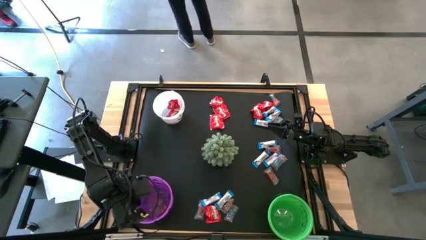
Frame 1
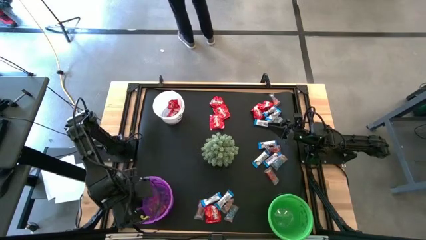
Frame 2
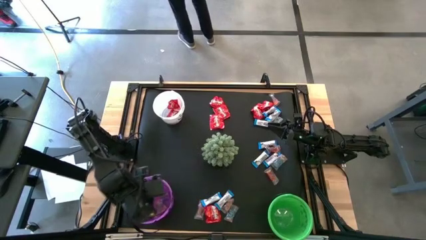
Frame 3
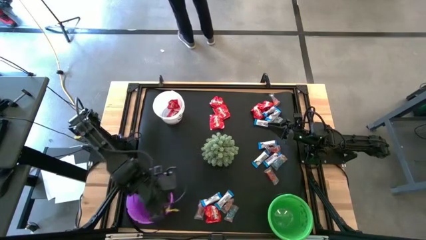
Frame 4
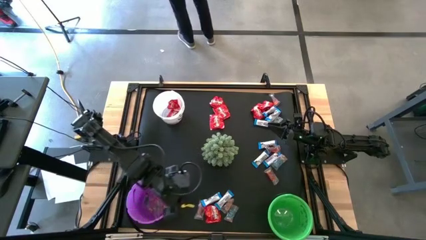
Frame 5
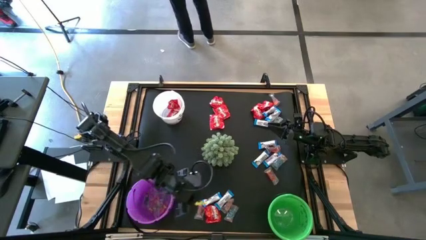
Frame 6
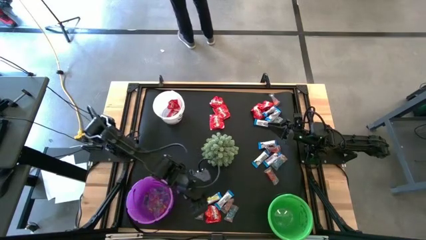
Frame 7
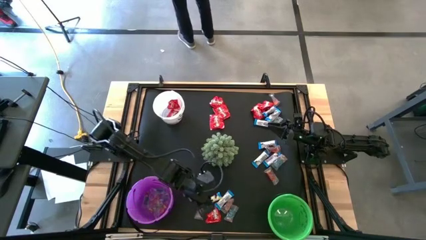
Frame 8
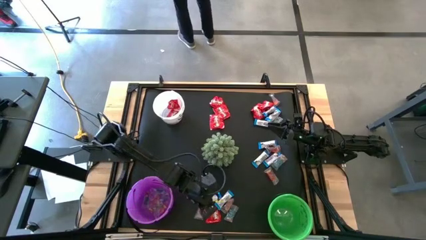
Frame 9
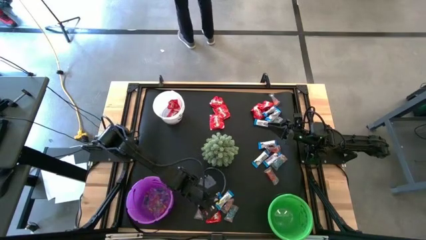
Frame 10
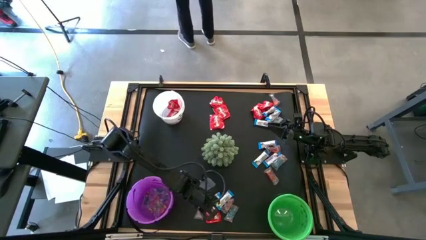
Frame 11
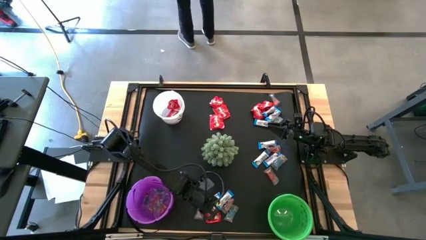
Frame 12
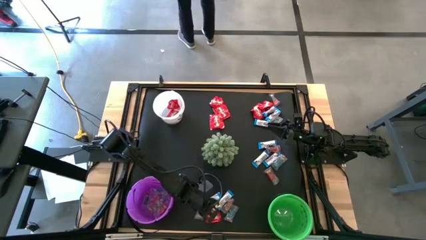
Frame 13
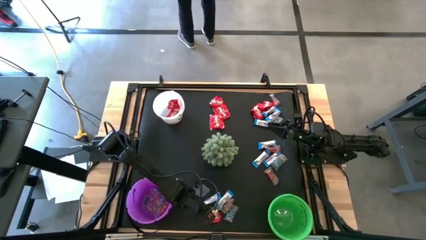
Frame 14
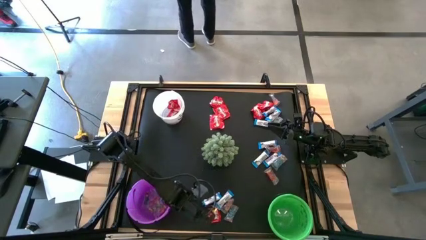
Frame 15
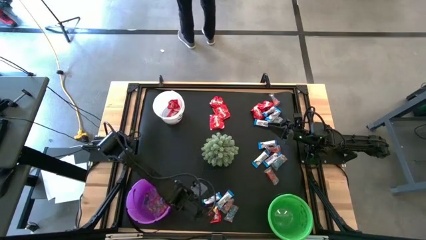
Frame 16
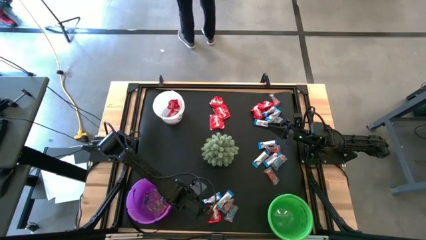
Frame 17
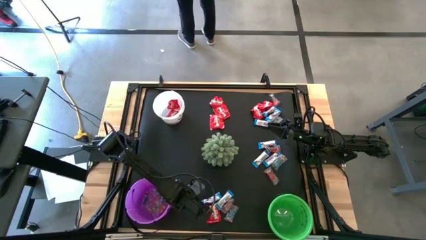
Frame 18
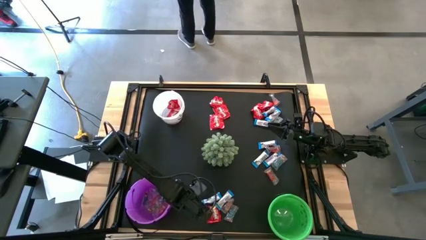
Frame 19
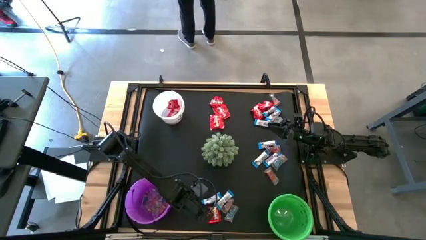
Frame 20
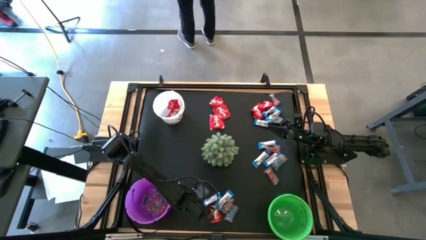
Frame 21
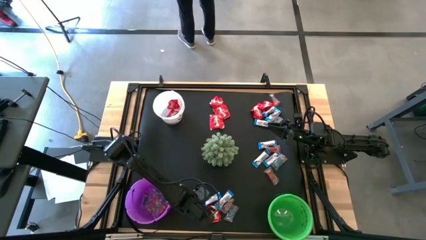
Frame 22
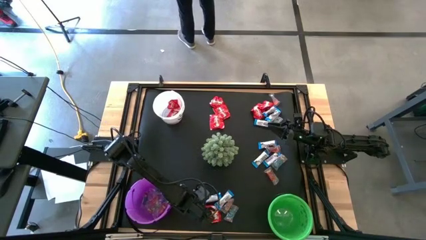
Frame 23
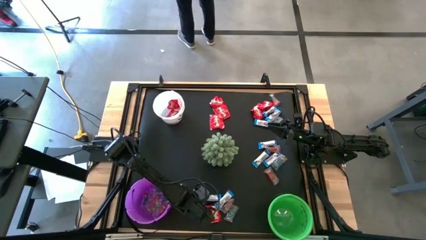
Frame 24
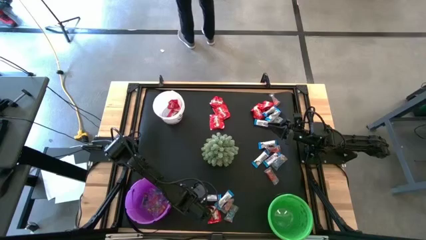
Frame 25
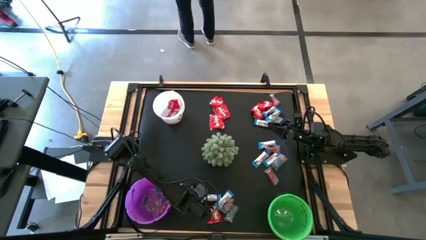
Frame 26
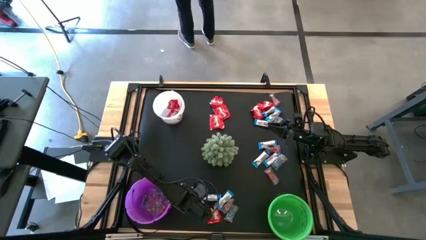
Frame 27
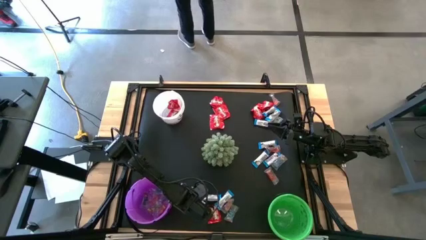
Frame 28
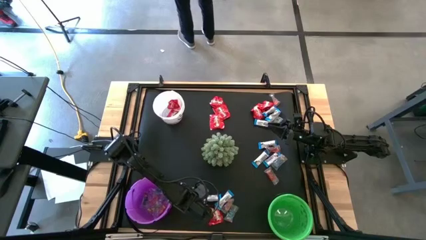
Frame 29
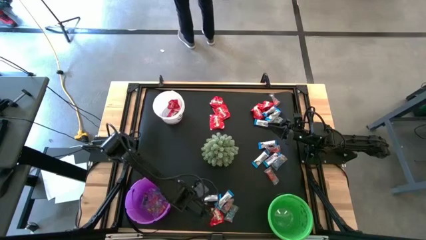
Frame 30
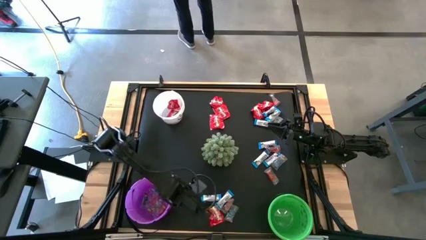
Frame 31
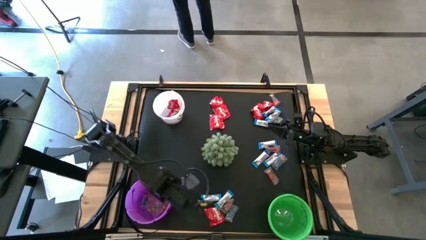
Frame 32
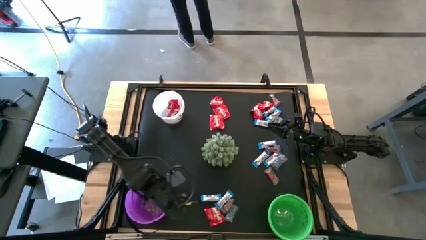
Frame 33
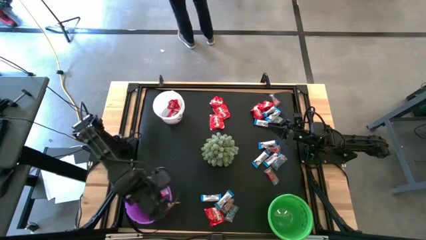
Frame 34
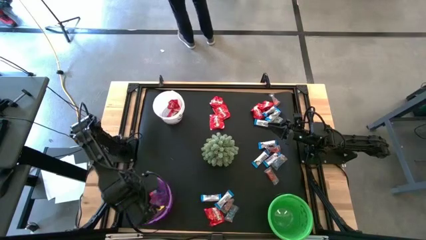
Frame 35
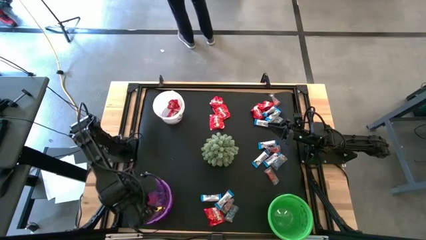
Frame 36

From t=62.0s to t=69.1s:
Task: Organize candy in baskets
Put the red gummy into the purple bucket

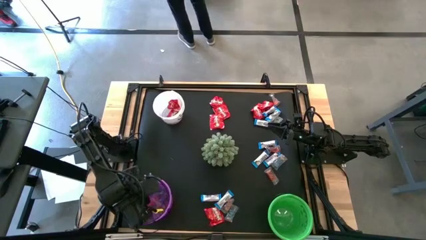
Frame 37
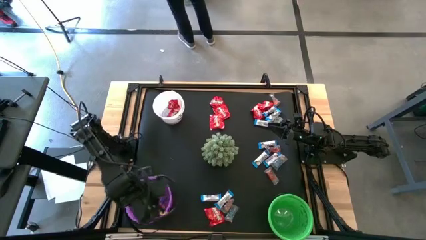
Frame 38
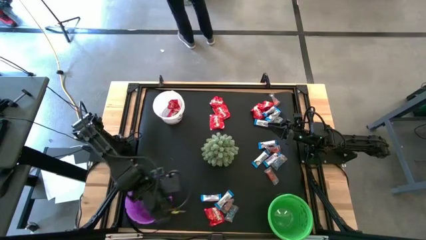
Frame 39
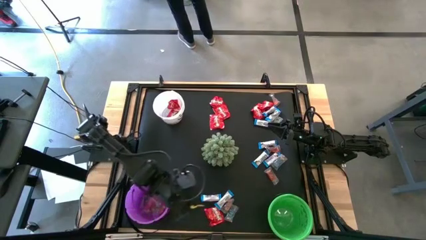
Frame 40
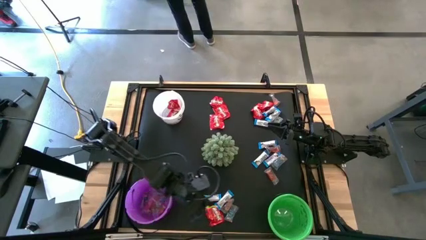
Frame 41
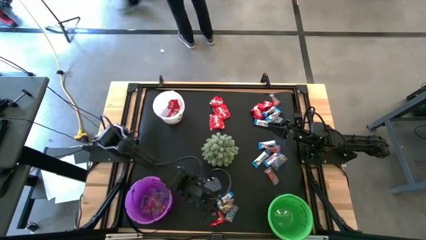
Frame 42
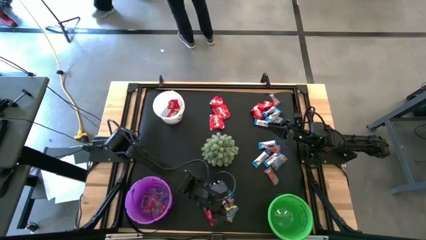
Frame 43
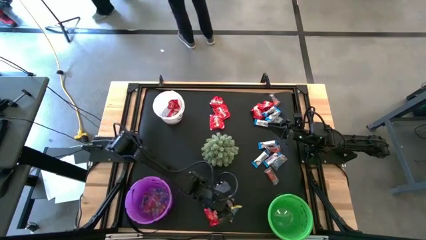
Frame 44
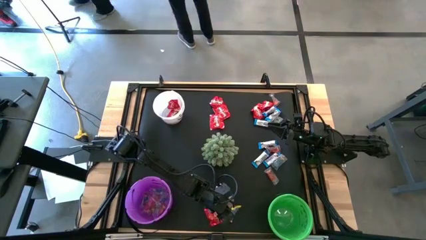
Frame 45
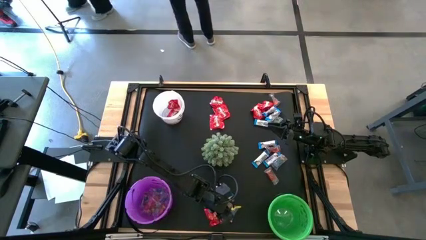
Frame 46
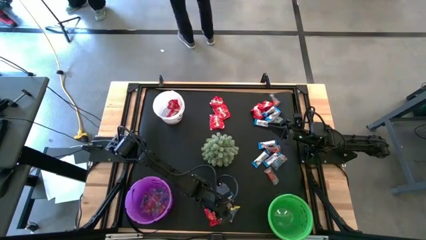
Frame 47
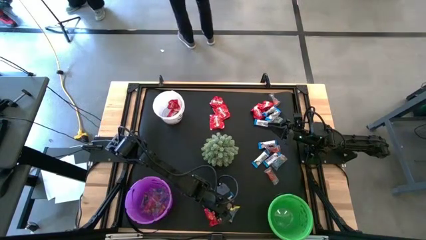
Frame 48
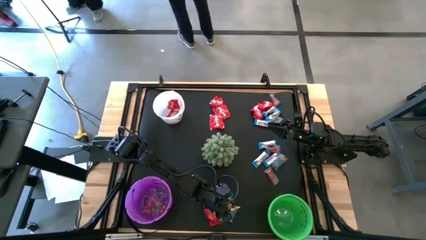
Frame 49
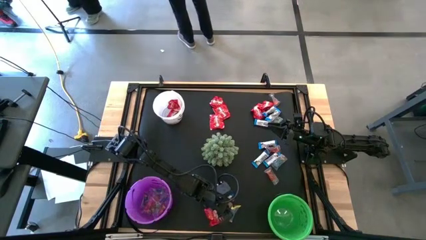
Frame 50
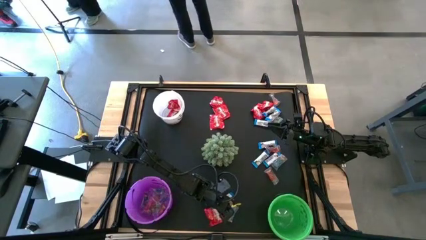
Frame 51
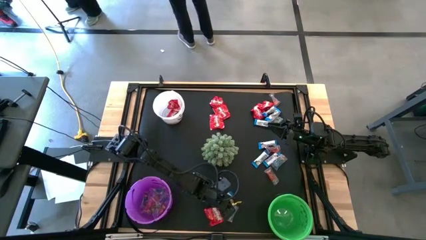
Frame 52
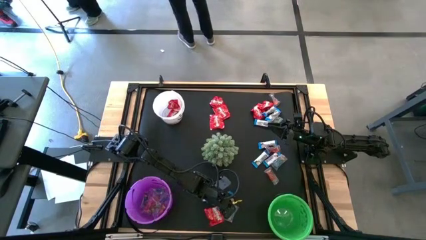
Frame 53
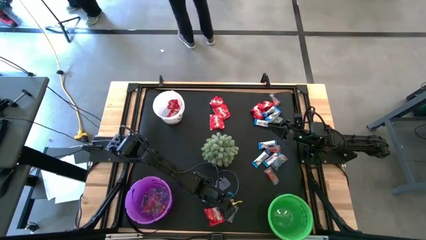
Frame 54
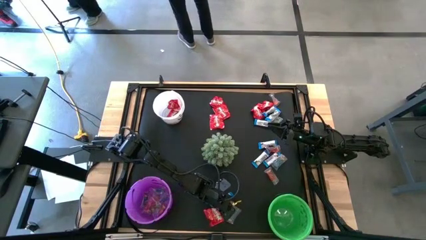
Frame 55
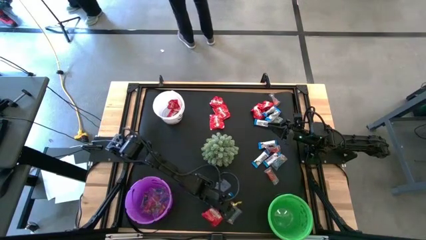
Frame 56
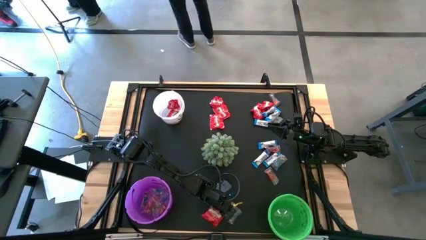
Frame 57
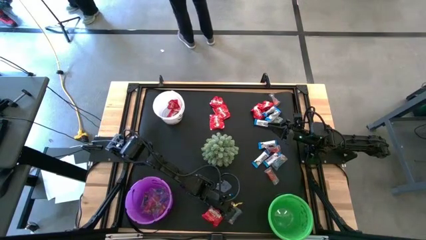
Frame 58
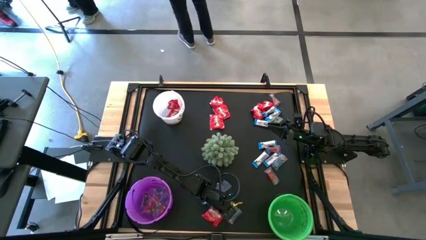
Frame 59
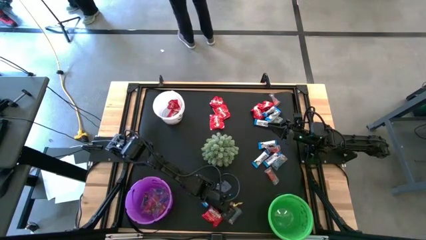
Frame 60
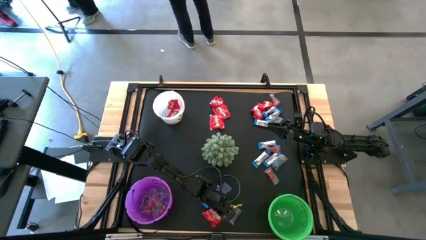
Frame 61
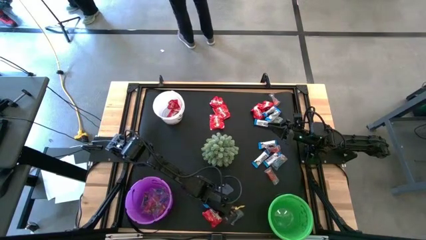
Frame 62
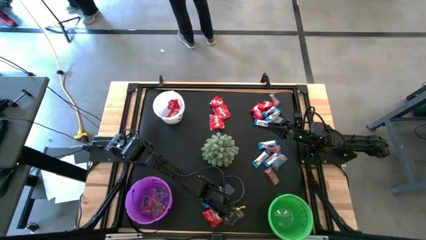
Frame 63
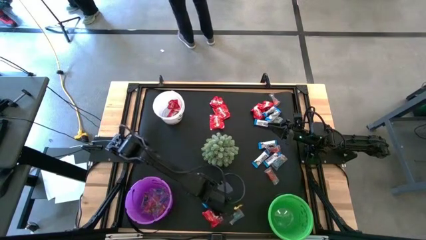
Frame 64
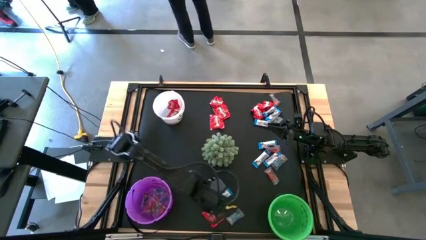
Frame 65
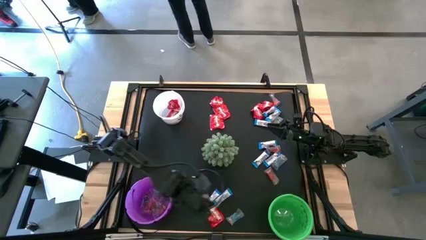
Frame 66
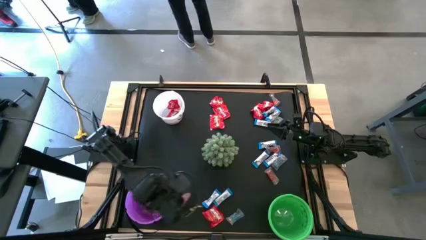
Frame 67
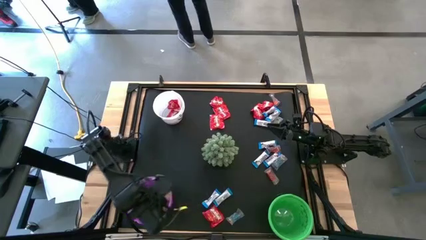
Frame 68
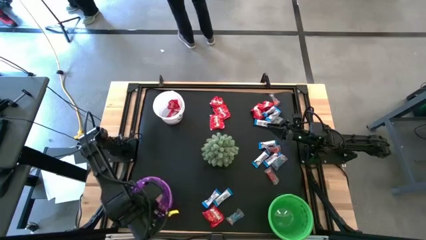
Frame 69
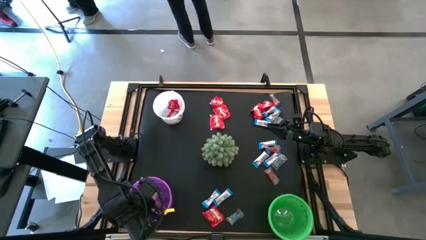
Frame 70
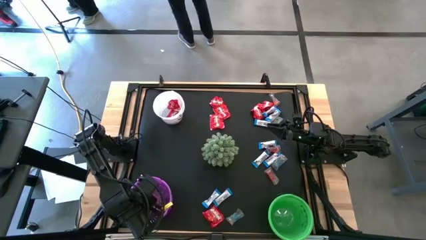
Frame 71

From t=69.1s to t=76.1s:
Put the orange gummy into the purple bucket
